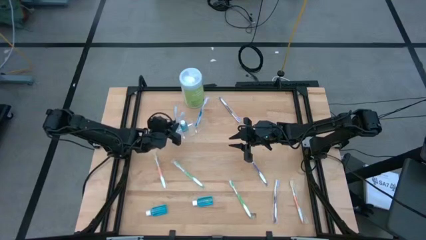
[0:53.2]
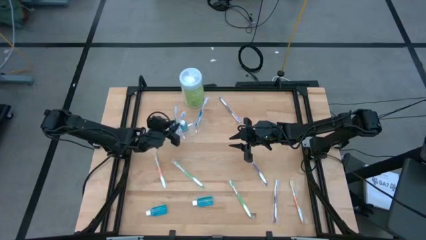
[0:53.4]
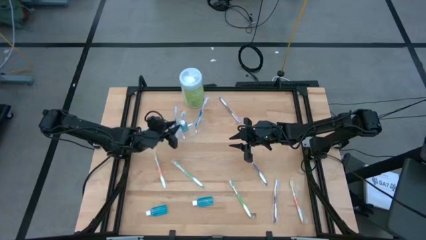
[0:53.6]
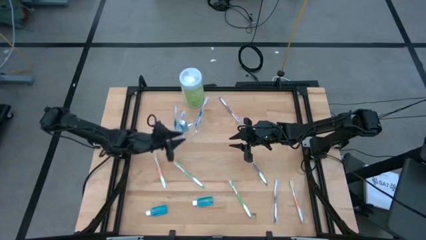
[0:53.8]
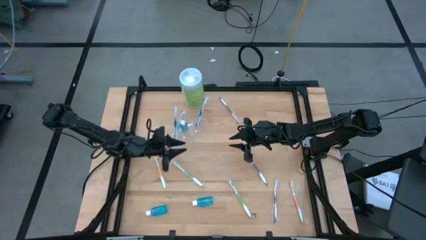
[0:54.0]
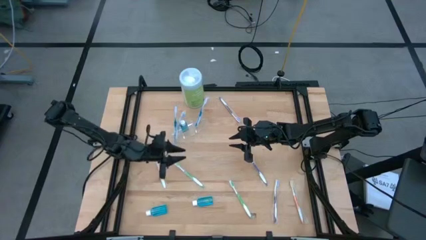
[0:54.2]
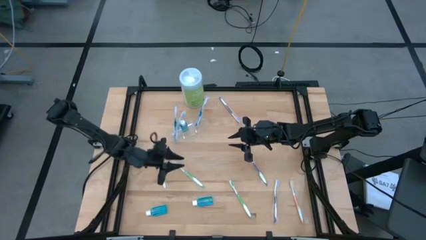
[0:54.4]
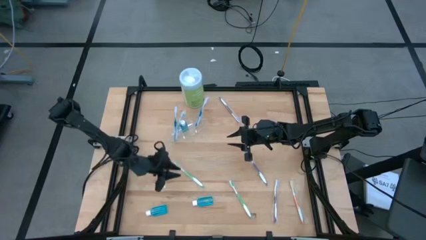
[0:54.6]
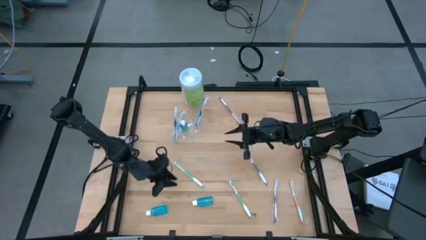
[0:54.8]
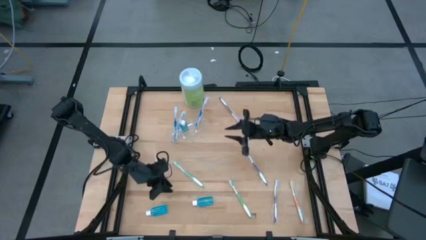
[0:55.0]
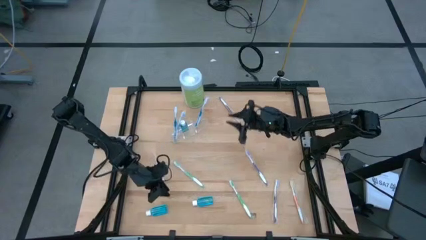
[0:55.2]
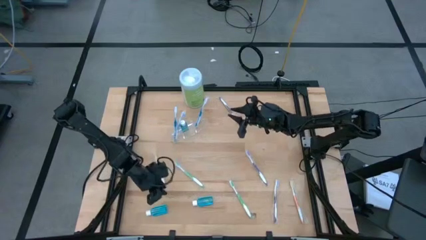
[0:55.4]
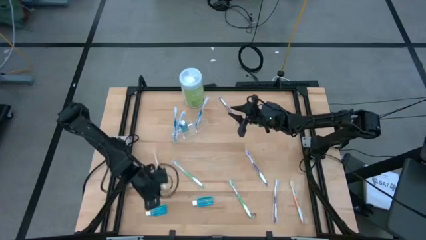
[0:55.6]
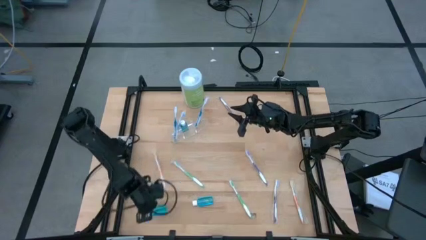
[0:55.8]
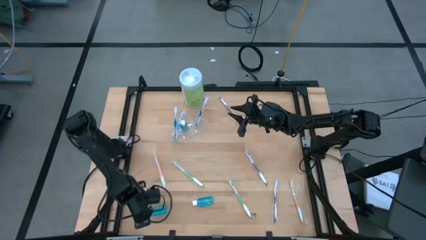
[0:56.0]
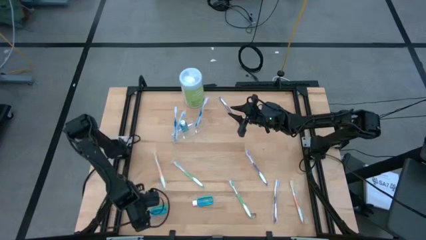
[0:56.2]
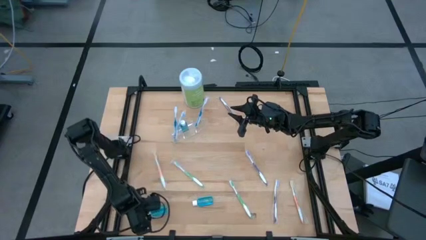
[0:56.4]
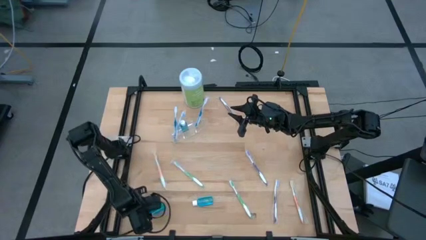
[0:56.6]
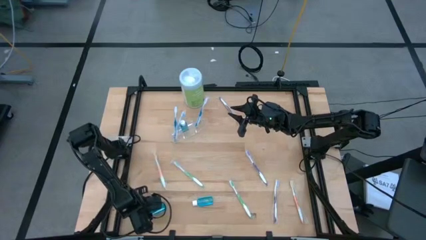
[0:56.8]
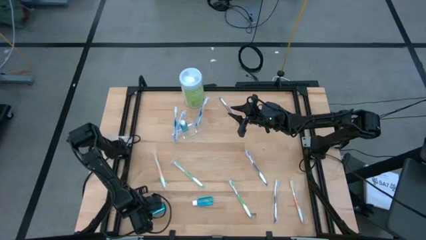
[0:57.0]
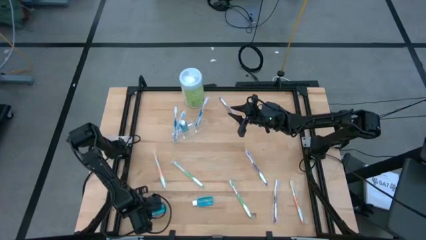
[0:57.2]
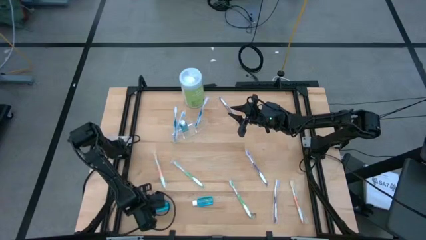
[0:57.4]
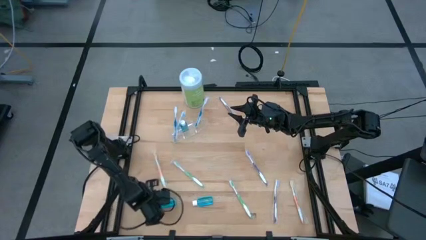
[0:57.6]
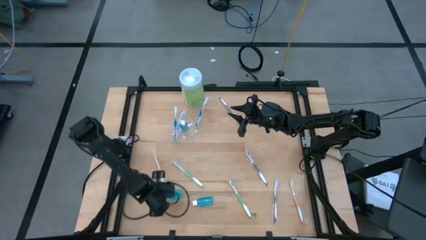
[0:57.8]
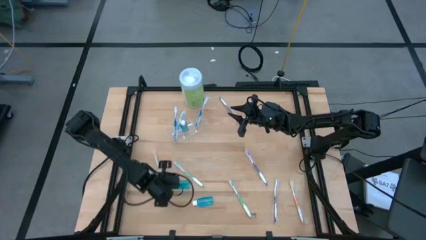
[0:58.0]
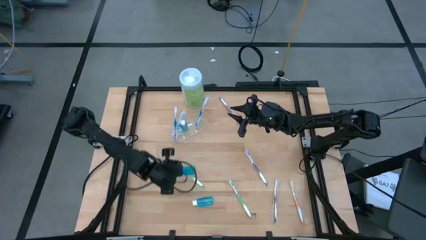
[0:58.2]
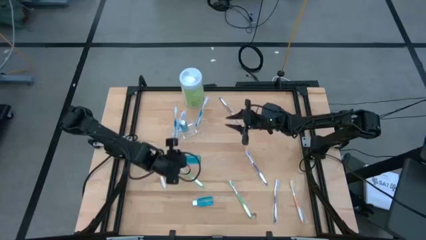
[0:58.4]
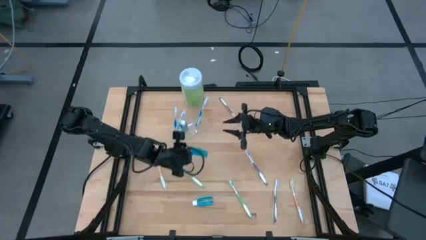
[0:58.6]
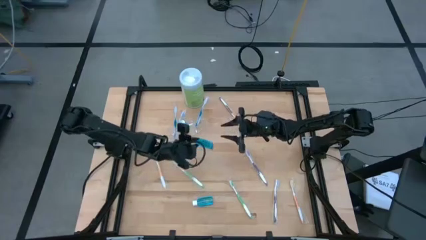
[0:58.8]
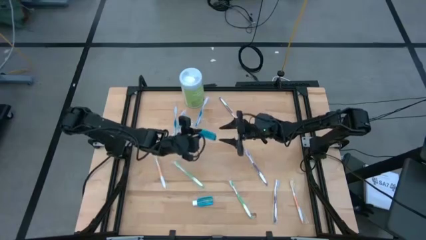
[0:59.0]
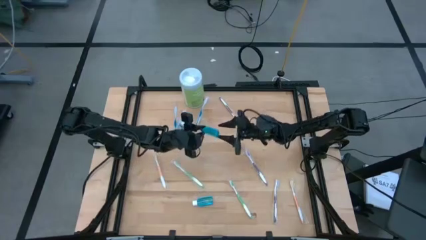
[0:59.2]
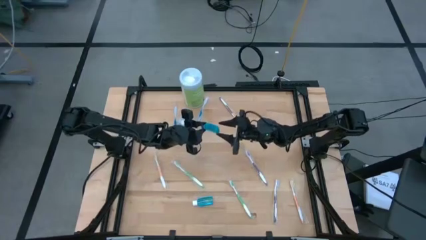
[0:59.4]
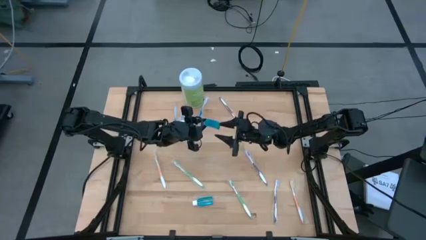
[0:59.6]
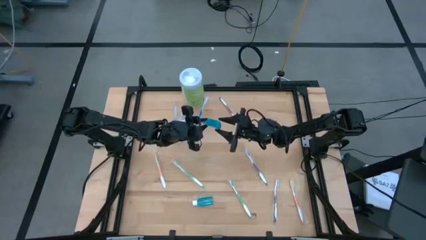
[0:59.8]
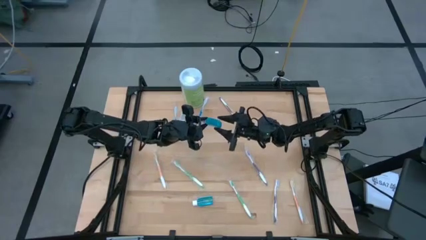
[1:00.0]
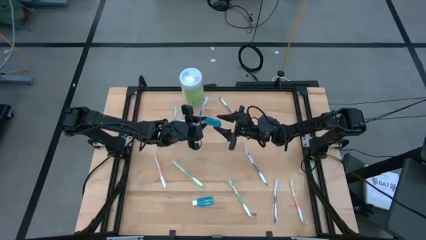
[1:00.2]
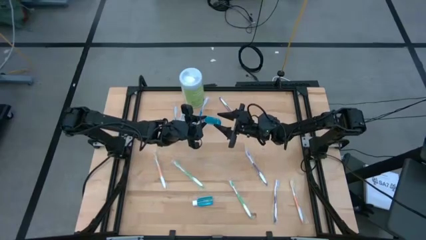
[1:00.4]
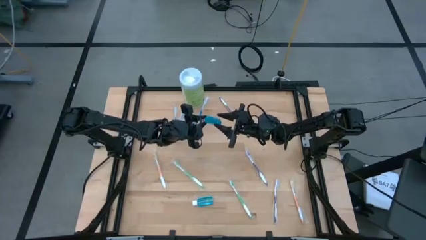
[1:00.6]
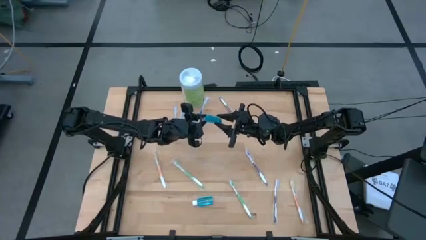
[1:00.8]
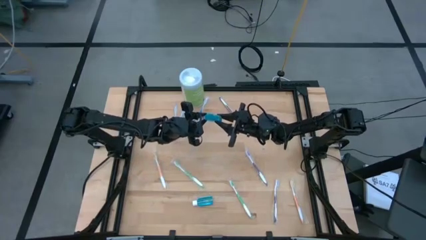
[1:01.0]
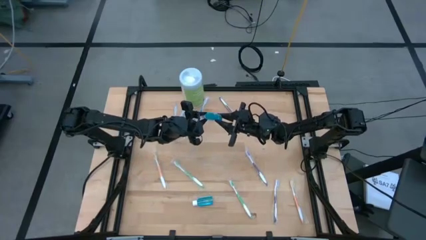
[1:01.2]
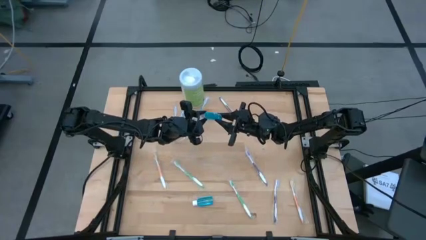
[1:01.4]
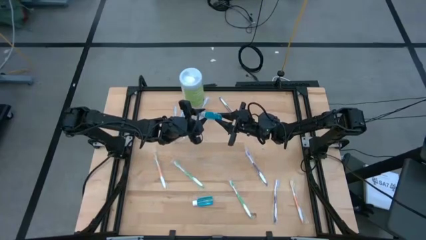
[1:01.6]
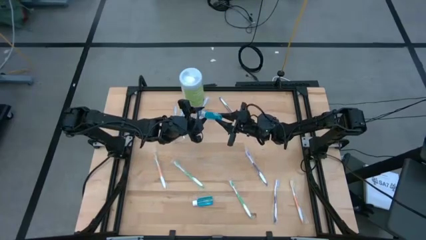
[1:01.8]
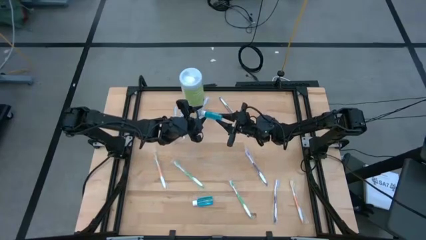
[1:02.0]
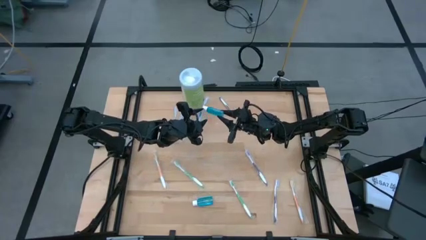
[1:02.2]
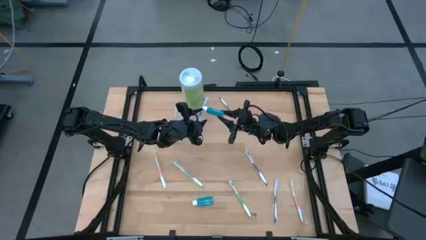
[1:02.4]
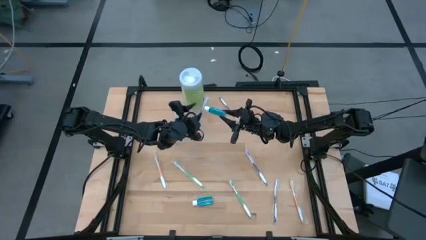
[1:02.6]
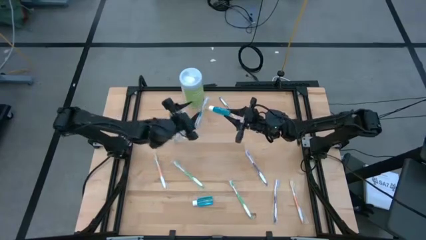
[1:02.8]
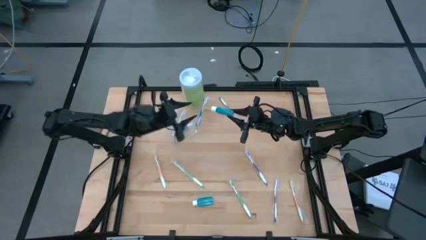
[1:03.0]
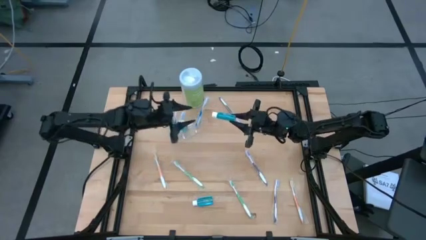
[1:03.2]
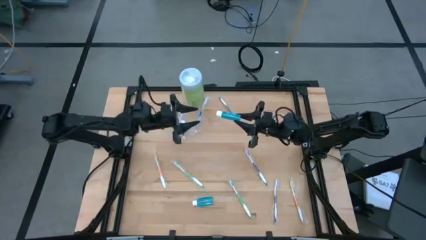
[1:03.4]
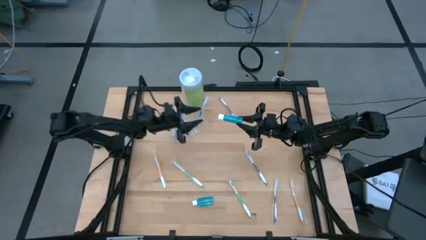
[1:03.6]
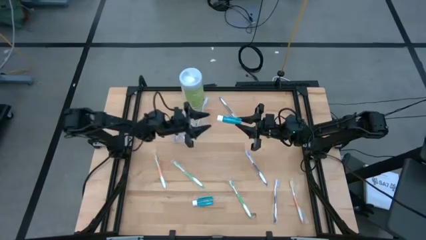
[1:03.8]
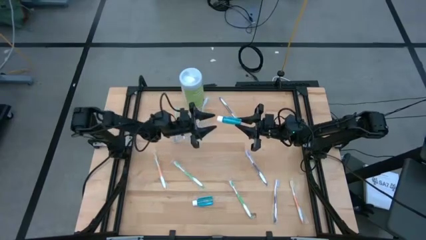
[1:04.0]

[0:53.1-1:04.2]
Task: Pick & Place toothbrushing station
Put the left mouthwash into the transparent organizer

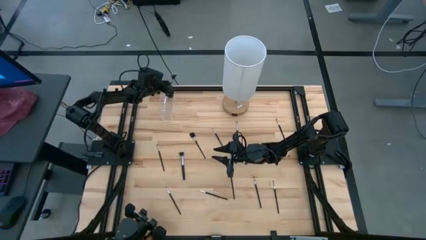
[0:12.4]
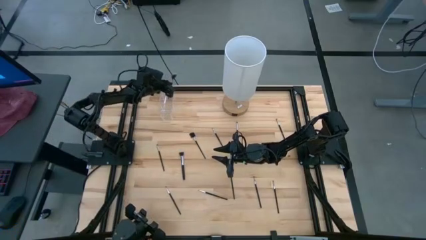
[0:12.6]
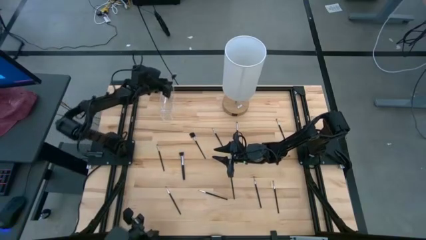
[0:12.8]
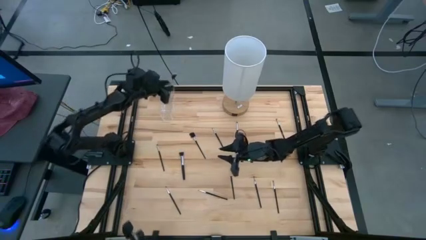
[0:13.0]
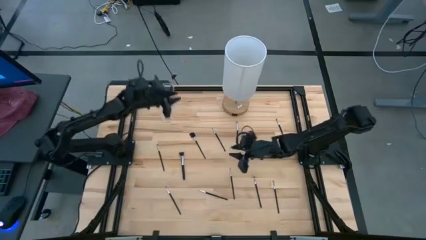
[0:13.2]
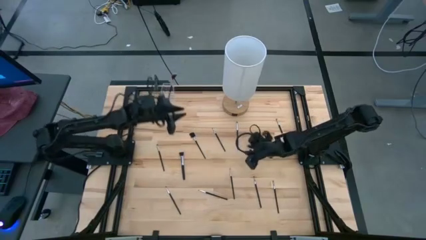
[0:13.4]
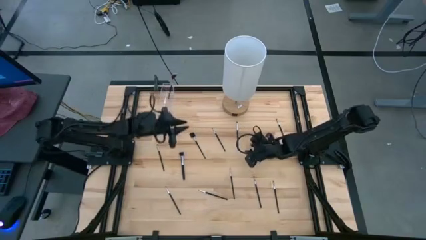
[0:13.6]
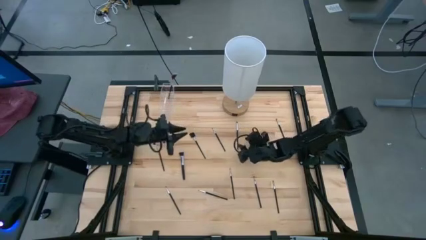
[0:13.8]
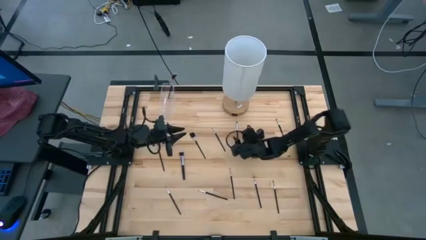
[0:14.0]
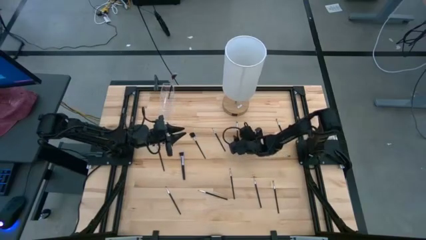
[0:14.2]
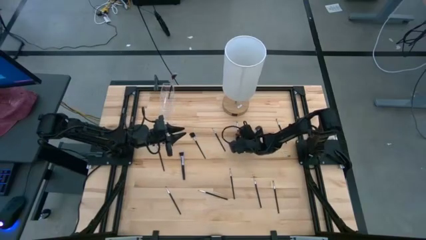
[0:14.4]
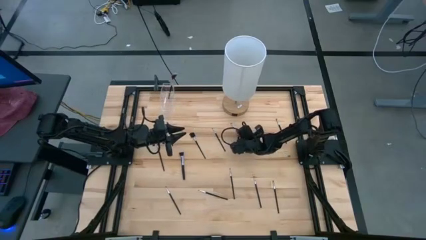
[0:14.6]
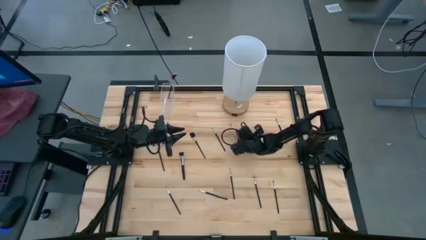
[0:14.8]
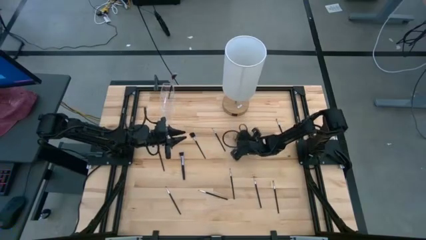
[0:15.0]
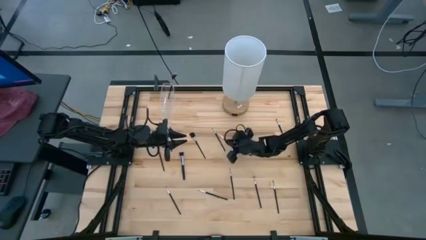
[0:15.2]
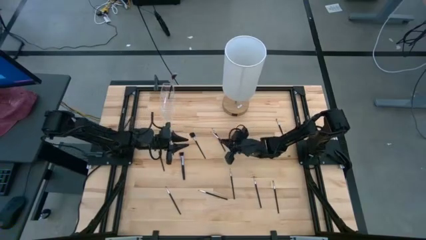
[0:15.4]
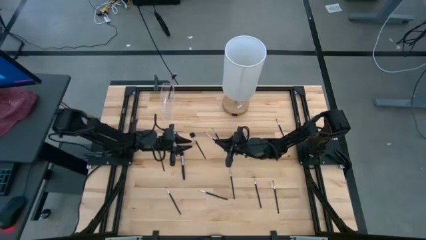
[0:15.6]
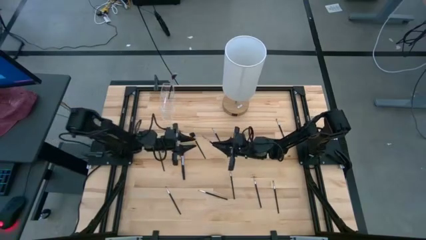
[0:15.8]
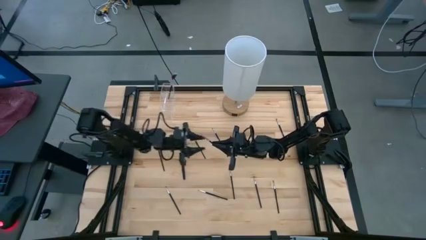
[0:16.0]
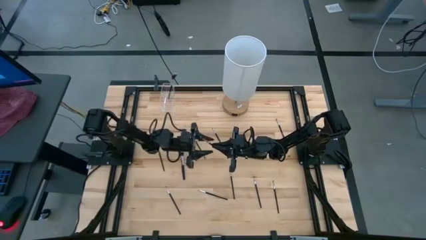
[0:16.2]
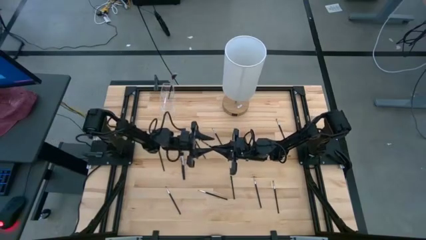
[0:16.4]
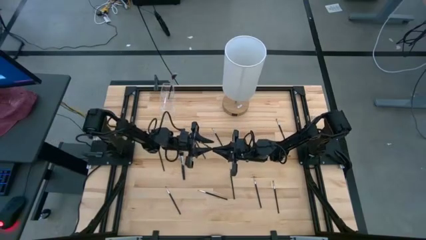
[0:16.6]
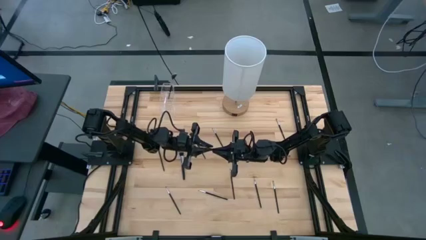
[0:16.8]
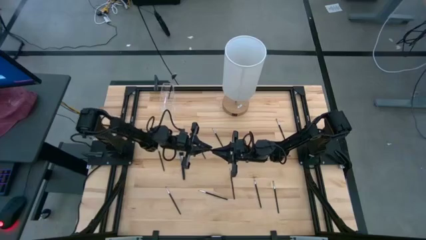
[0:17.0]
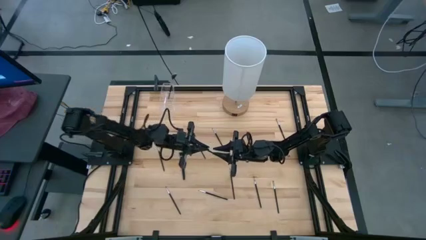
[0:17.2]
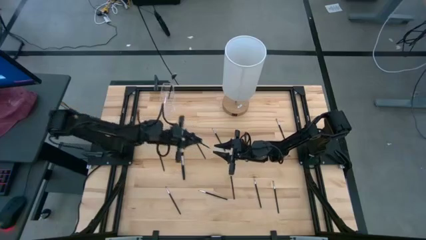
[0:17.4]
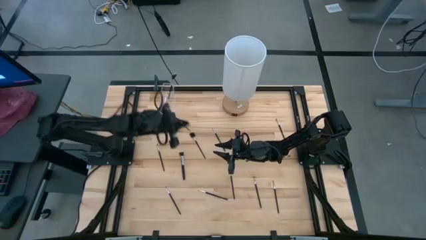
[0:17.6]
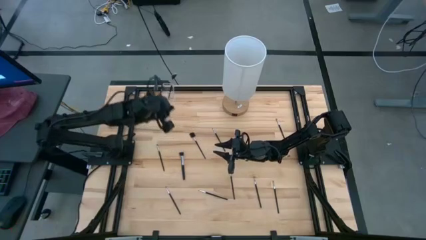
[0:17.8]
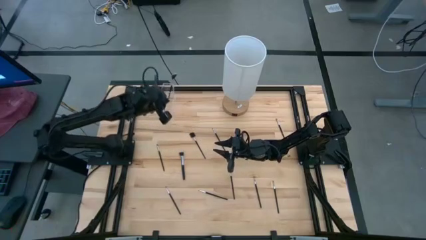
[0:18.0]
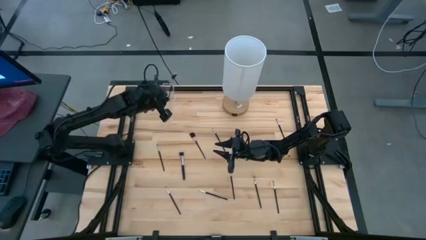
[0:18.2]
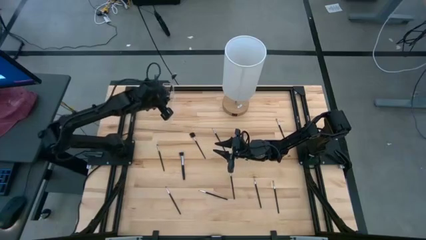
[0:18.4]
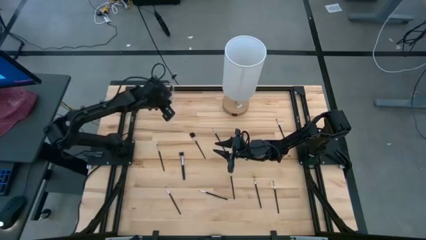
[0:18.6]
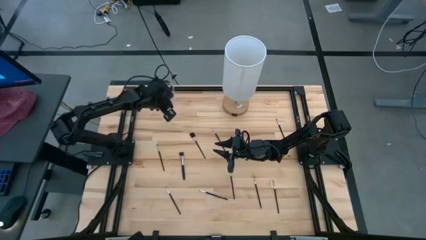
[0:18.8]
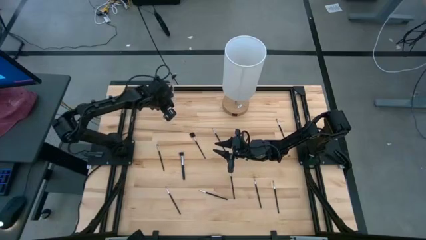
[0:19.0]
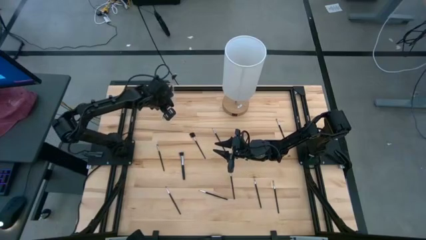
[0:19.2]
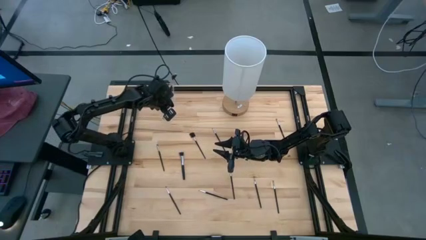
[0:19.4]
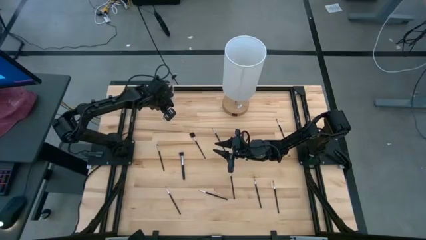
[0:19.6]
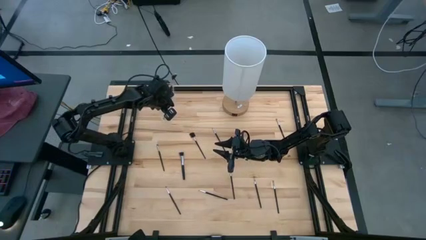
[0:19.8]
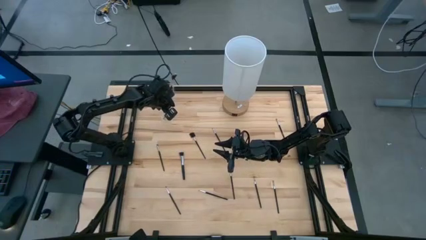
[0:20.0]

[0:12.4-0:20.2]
Task: Put items in baskets/containers
Put the black eyeshadow brush into the transparent organizer
